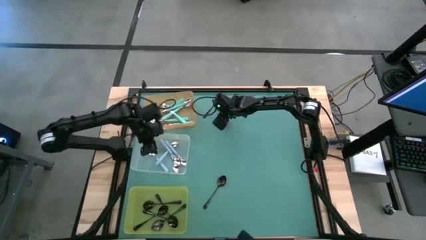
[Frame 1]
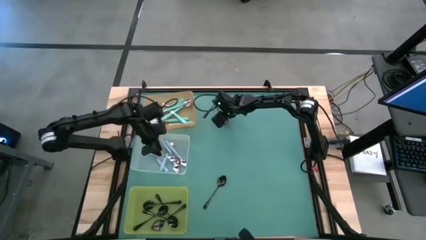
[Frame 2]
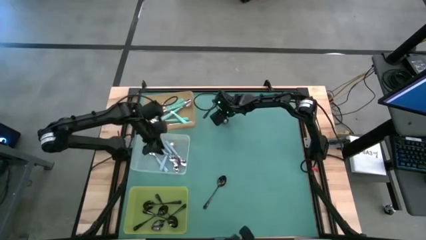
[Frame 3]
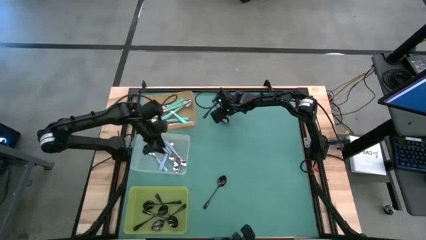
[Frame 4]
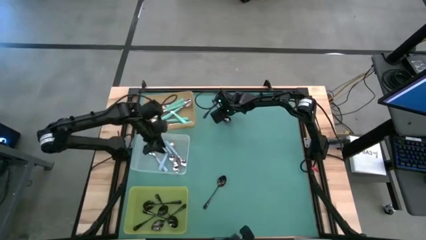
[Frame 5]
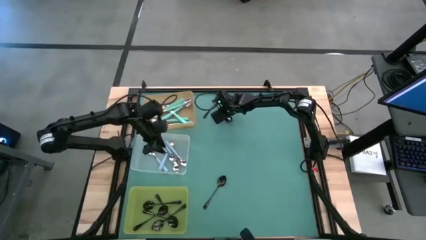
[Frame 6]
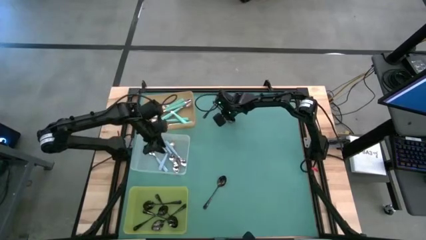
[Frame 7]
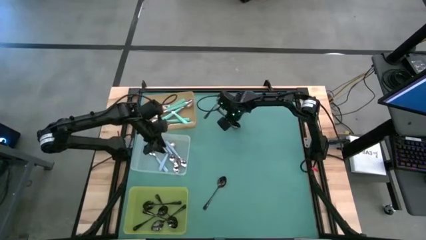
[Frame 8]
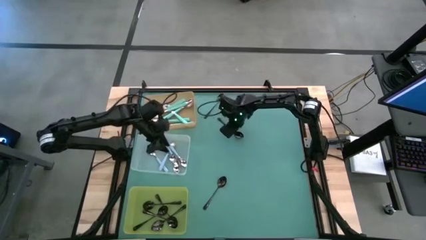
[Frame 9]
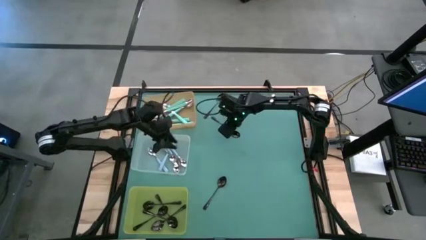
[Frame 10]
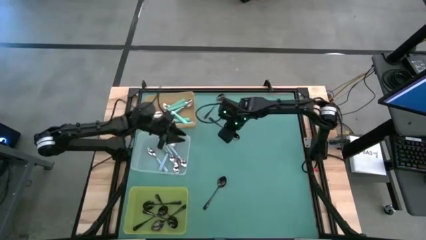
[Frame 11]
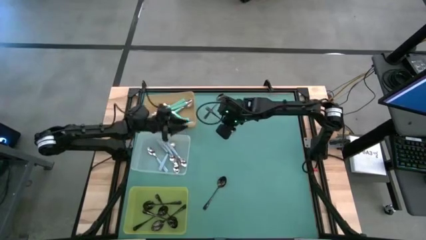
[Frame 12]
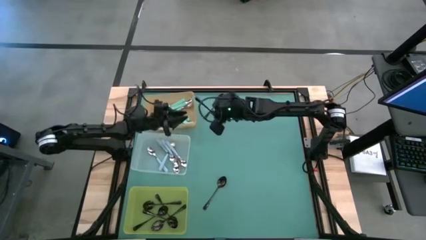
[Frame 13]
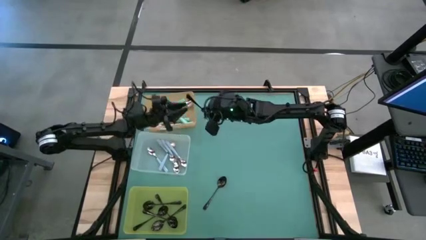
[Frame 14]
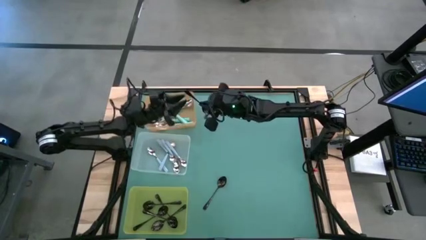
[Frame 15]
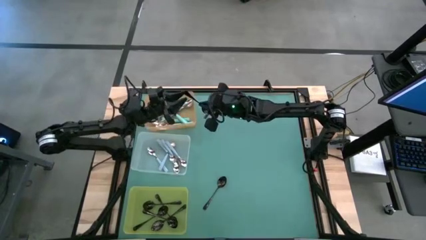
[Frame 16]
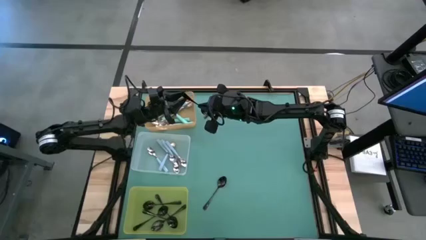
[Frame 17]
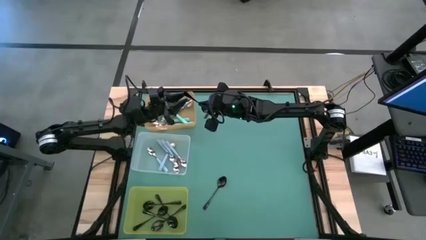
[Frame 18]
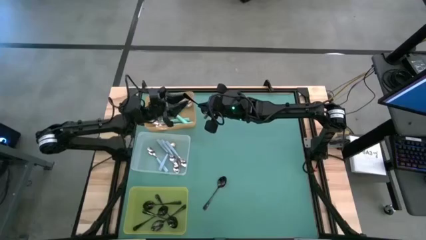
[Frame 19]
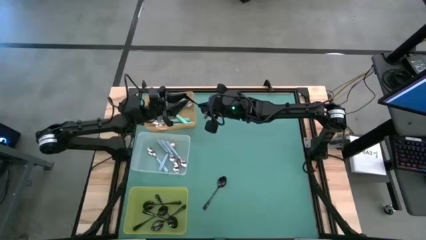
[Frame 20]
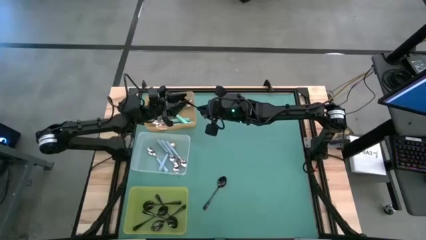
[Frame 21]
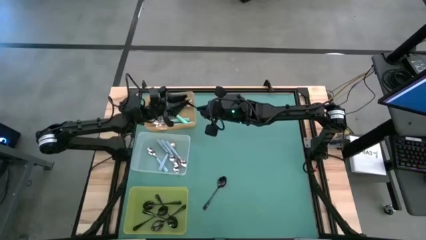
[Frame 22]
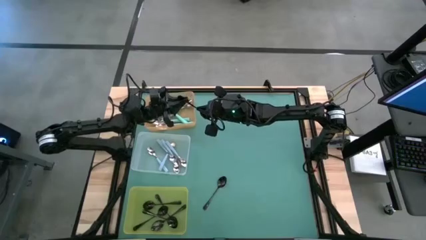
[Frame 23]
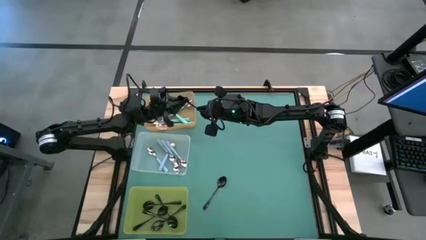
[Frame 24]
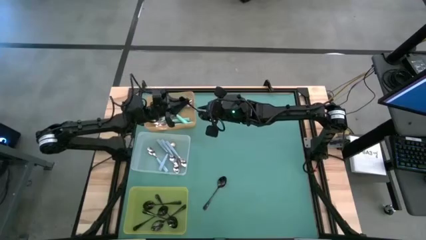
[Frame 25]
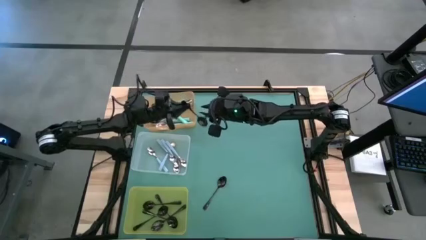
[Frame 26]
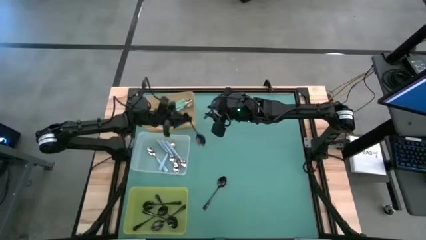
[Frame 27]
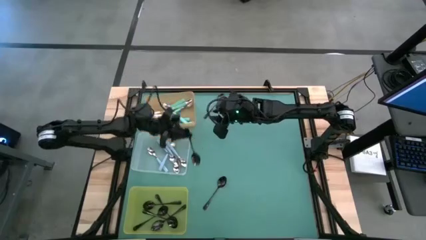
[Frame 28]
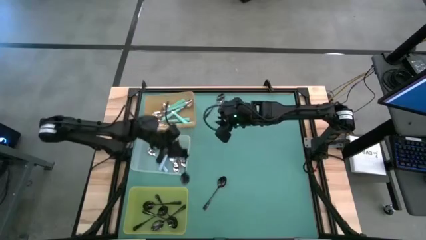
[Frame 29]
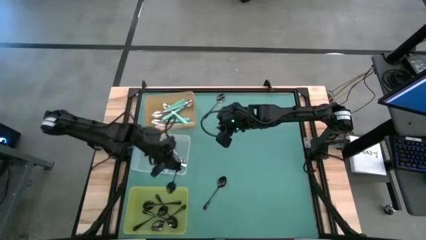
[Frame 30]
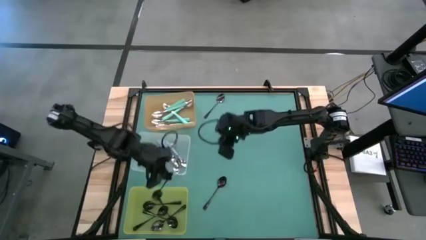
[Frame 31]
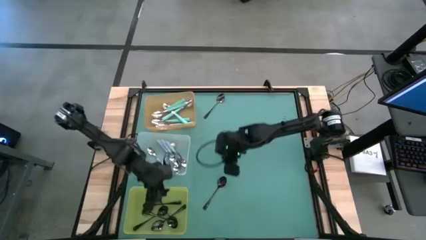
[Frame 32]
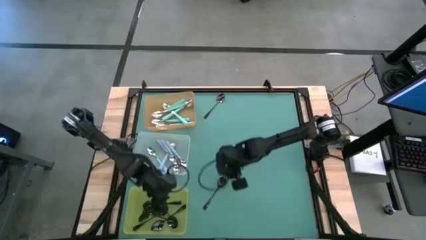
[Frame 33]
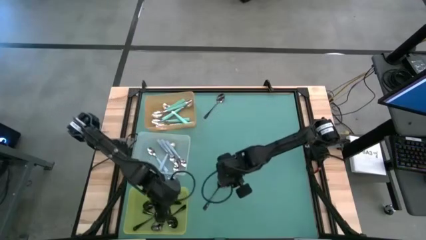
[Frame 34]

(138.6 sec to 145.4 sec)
Task: Sort silverware by color (type)
Put the black spoon into the yellow bin

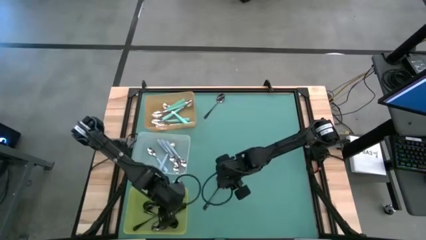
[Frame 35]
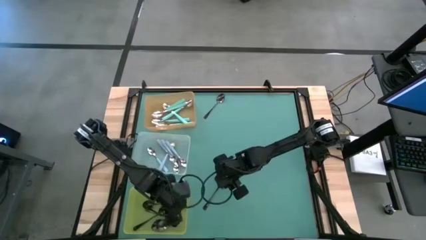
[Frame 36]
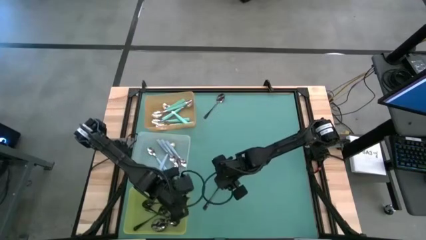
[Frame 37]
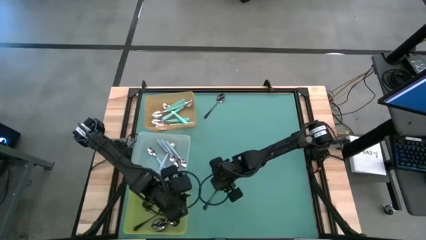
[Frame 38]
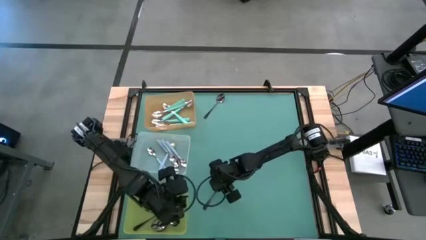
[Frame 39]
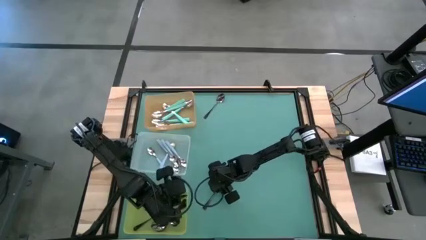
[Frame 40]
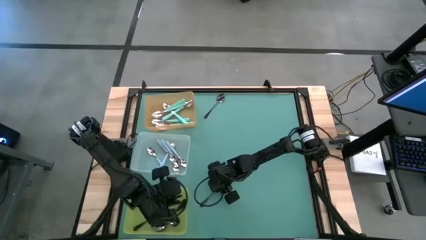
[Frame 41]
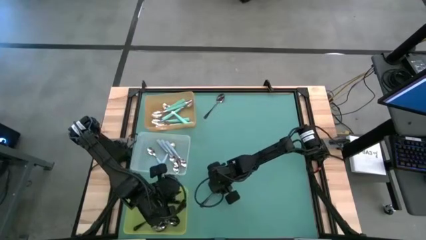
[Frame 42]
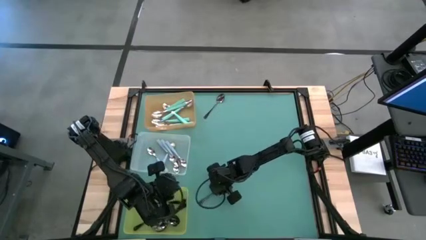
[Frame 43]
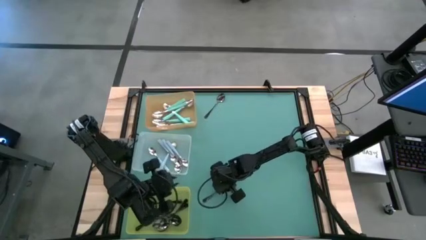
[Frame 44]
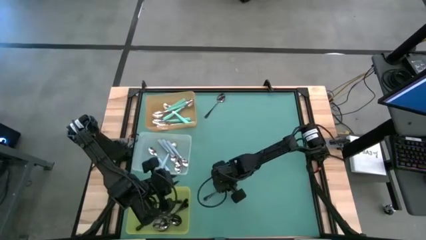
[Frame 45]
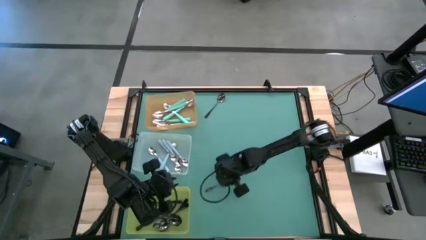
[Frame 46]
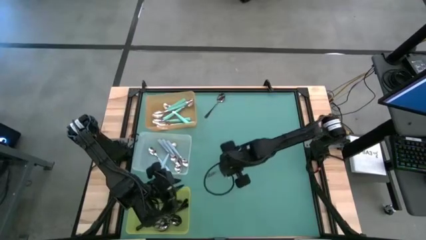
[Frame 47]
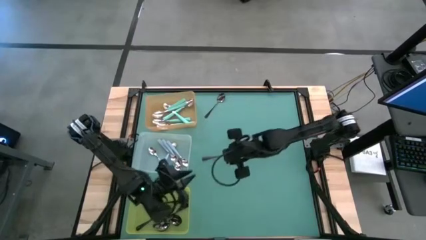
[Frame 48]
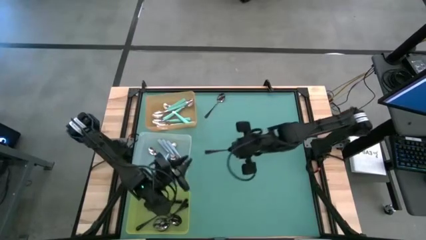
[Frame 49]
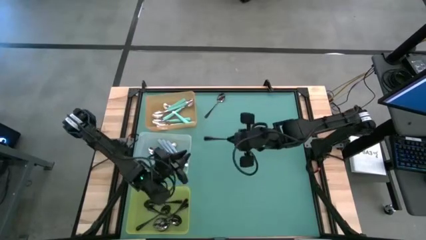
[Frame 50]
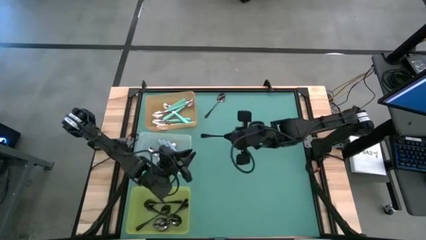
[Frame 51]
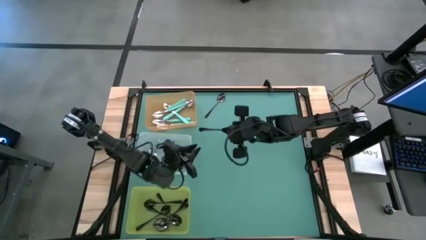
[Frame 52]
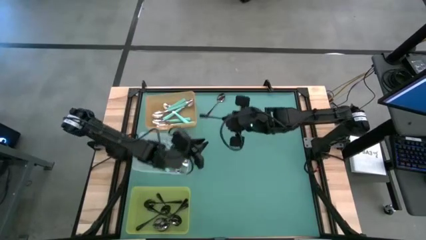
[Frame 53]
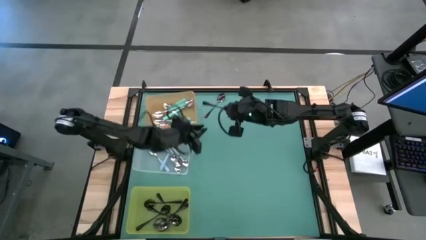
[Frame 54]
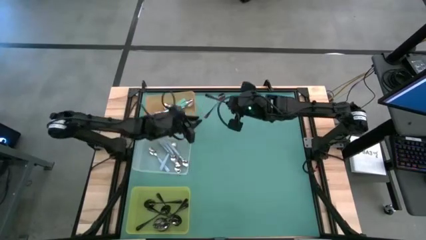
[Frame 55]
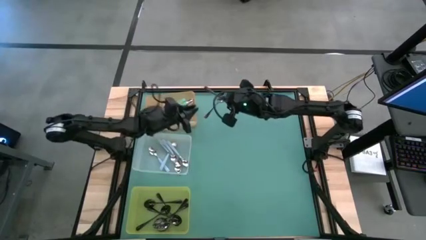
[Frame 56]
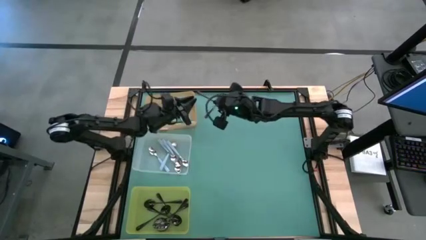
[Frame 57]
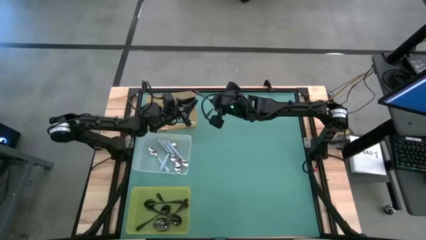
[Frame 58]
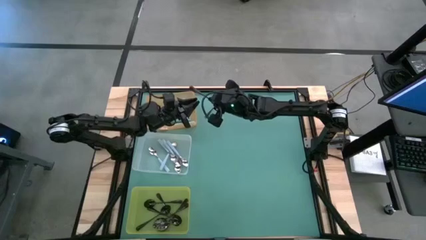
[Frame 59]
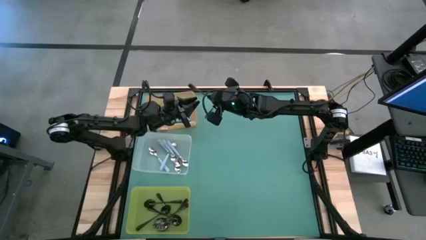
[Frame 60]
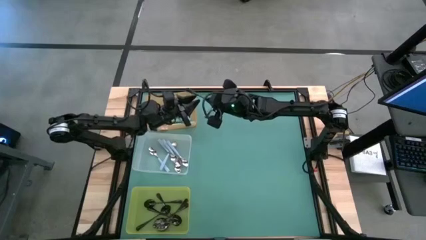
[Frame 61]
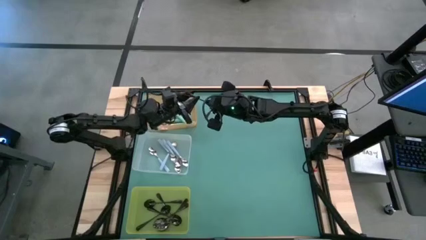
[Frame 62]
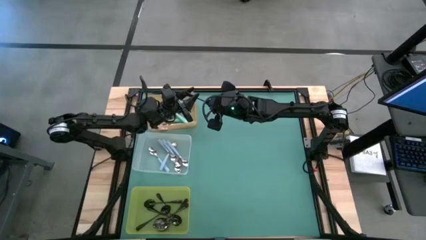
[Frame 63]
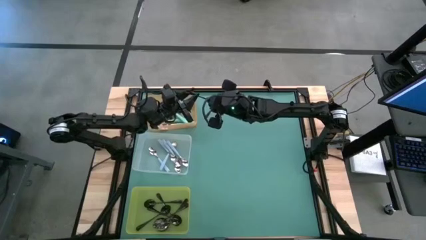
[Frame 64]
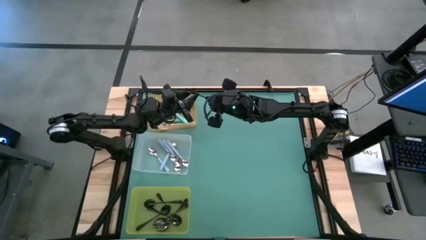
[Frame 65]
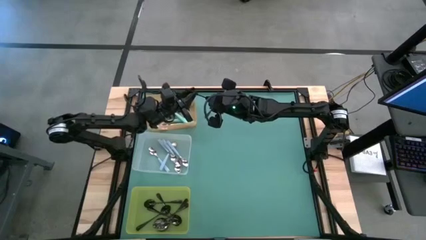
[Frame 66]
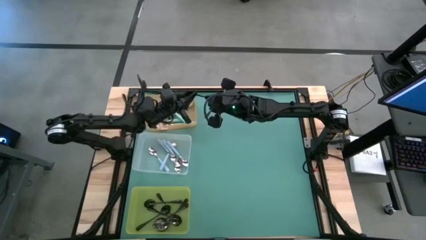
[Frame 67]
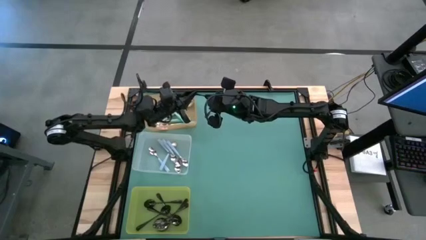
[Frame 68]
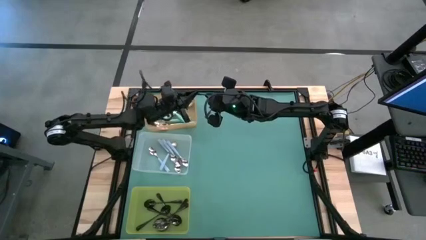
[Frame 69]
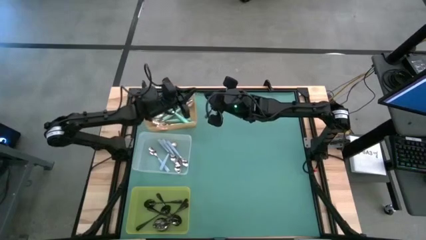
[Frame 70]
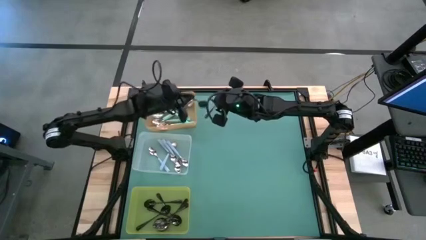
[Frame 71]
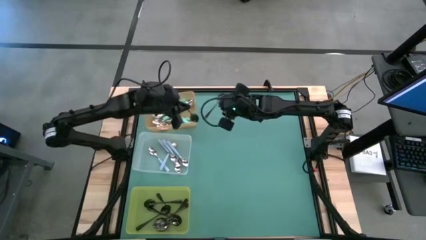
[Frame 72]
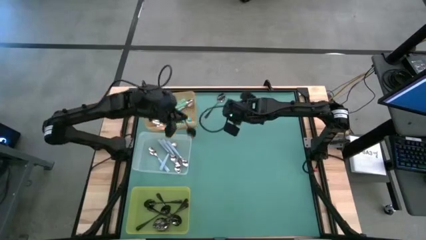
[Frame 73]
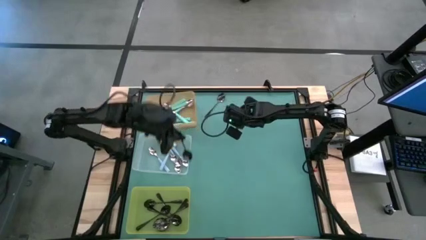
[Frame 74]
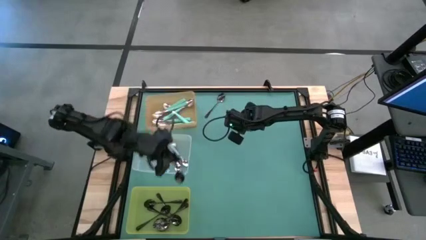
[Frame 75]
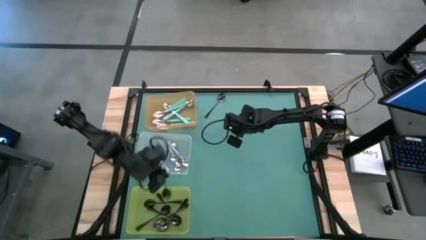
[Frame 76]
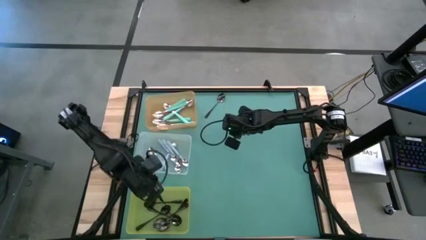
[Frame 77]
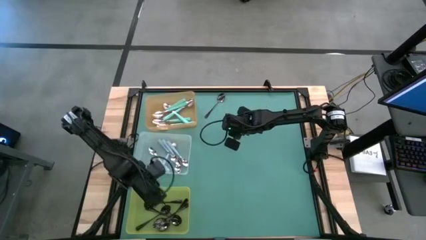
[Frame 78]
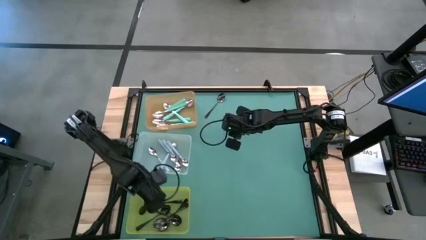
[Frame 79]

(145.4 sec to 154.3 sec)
Put the black spoon into the yellow bin
